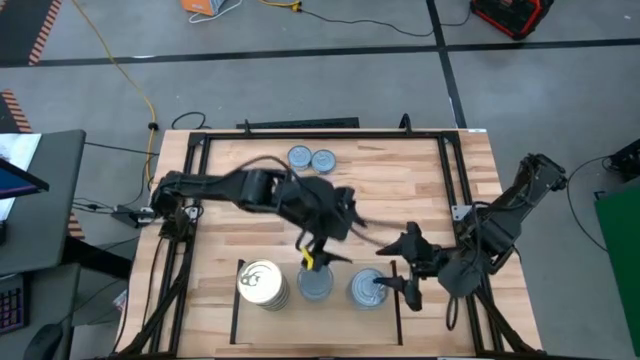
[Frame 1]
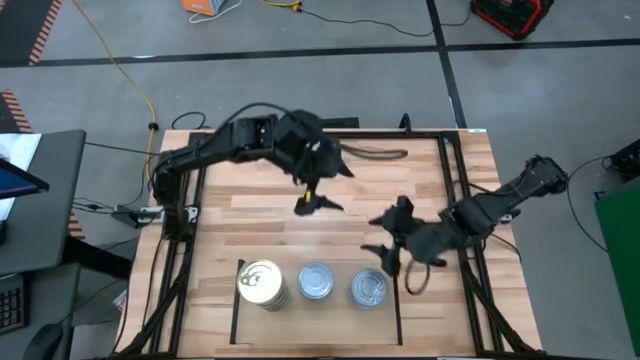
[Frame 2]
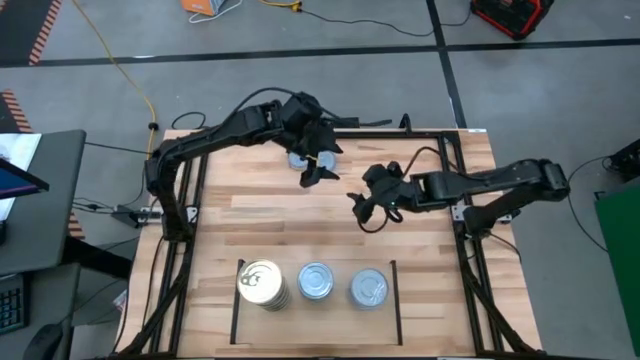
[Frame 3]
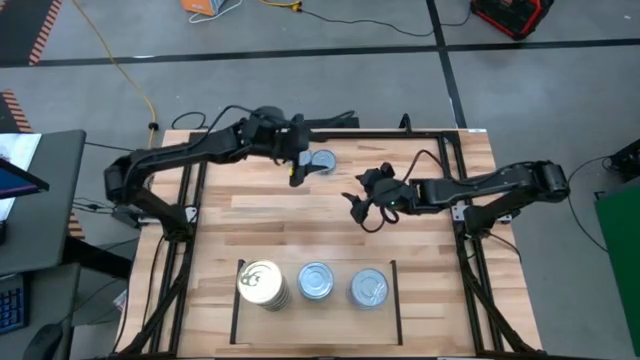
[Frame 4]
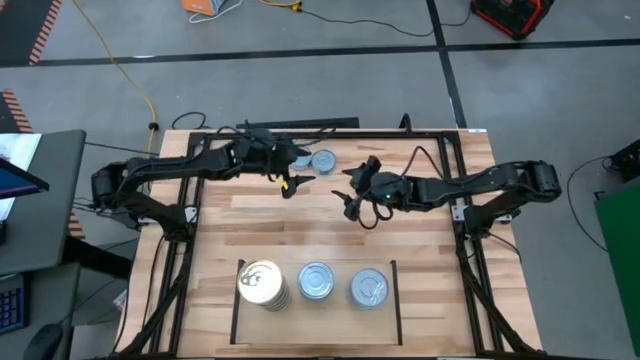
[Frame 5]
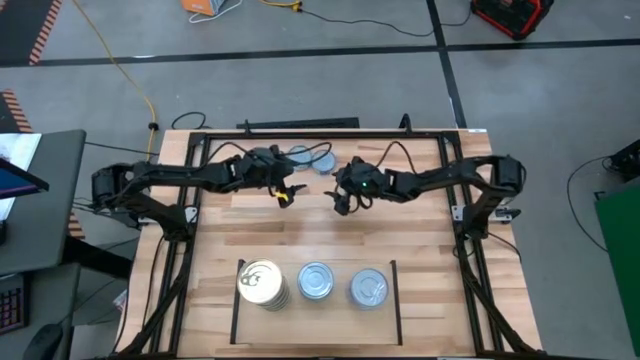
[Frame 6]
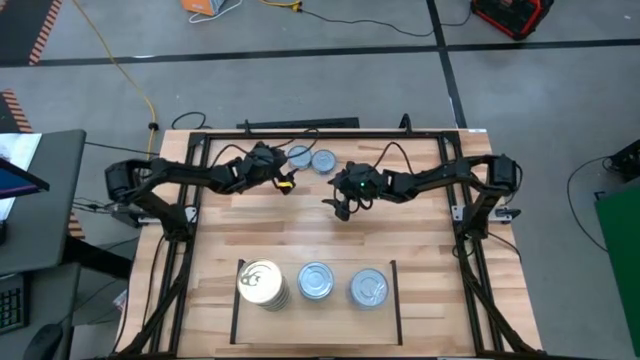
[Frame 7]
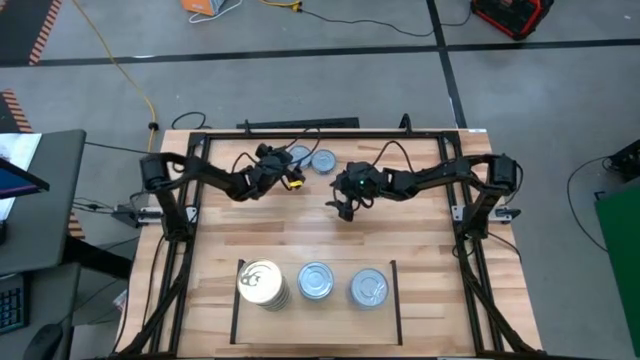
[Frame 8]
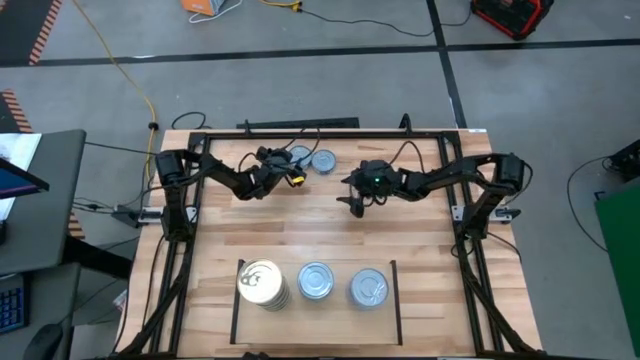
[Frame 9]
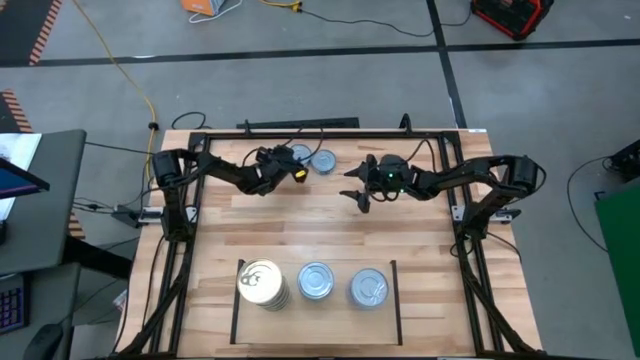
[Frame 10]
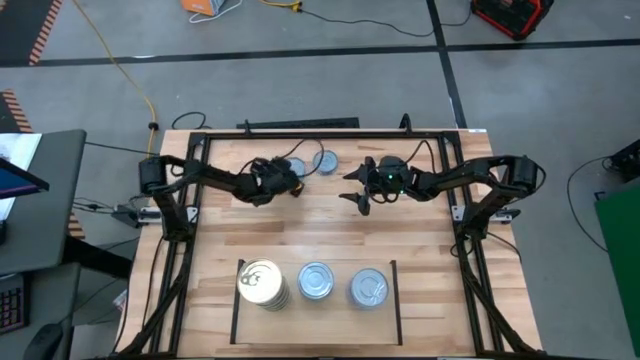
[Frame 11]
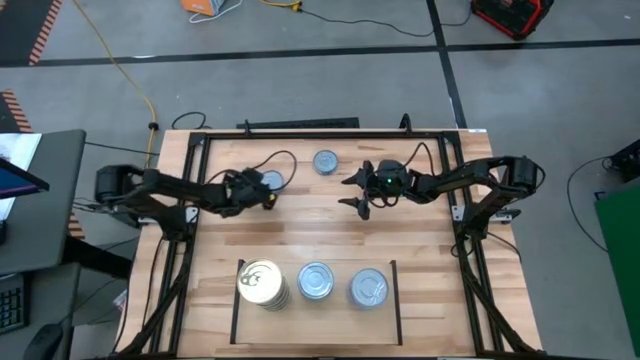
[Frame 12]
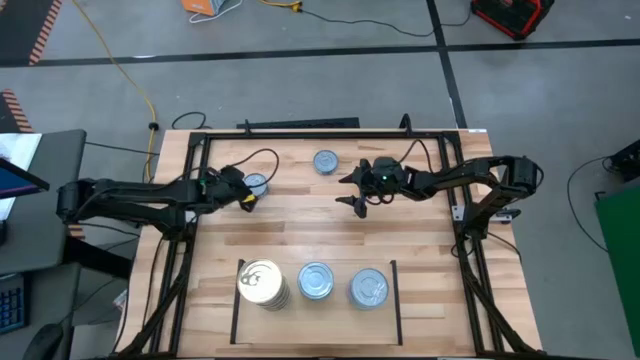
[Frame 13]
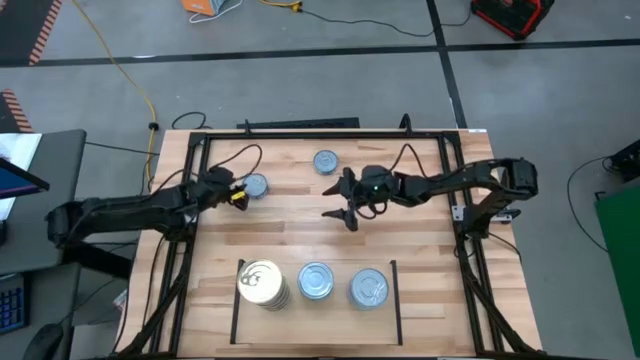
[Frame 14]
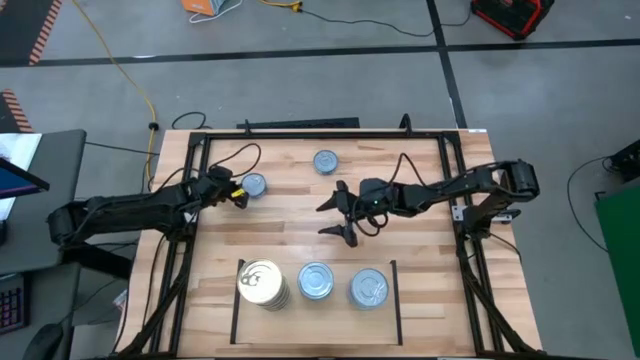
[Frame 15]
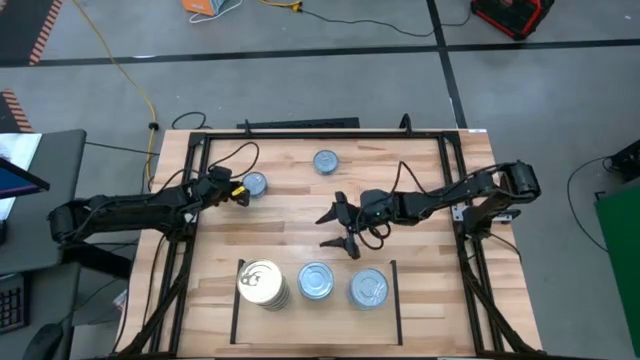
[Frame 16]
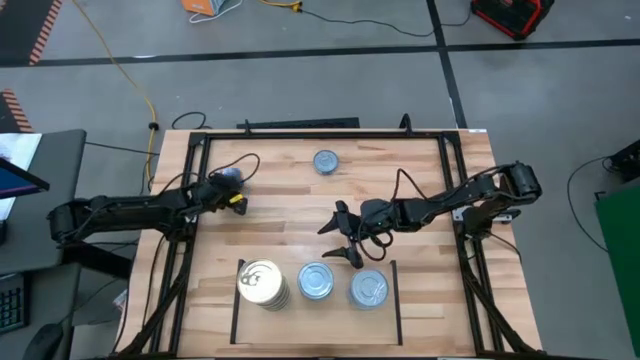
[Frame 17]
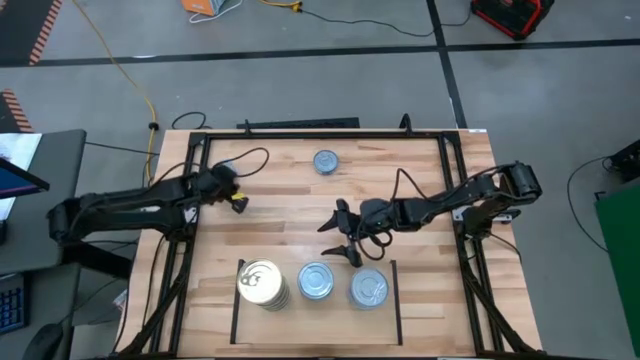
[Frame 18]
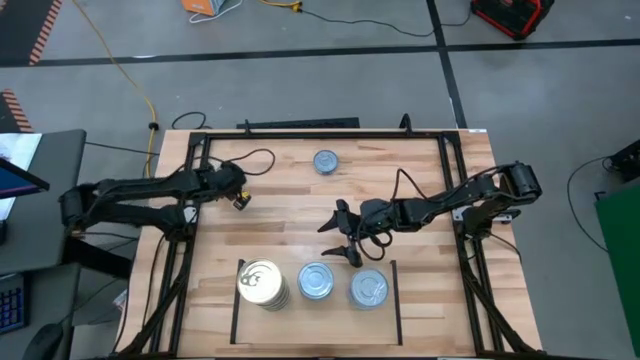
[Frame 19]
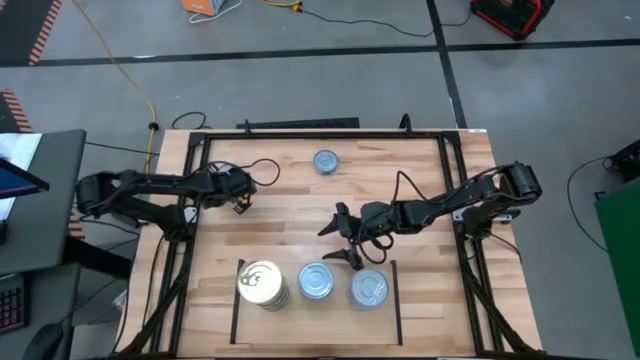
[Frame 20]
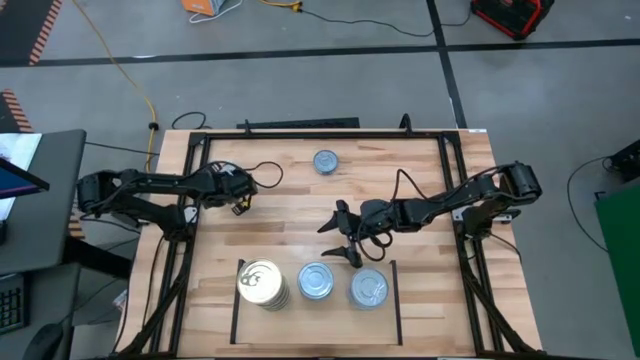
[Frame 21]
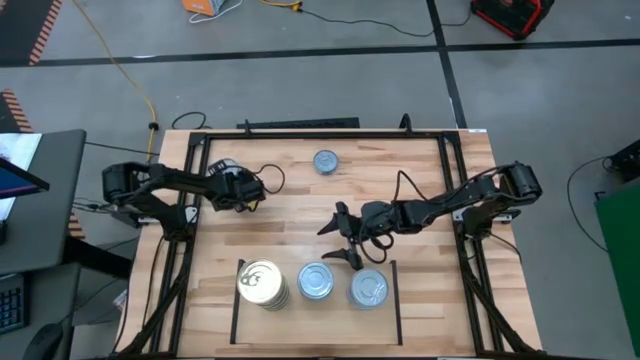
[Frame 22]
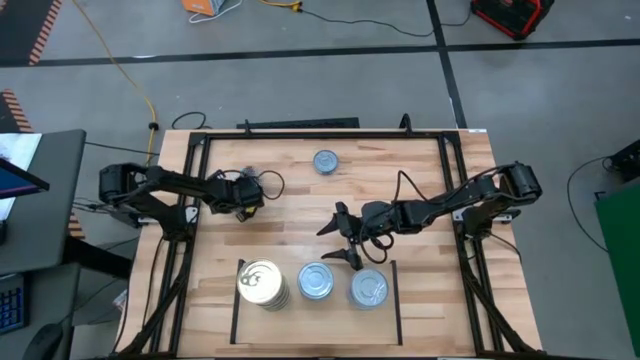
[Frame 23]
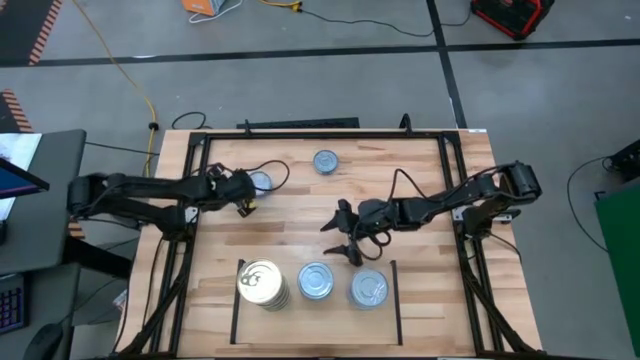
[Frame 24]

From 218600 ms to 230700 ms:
Task: Stack canned seafood by type on shelf
Put the left blue tuna can on the top of the left stacked tuna cans on the shelf

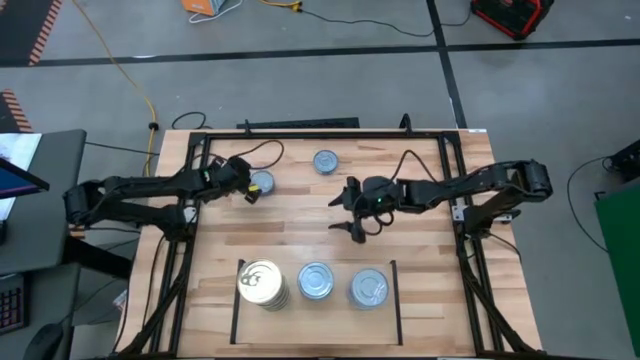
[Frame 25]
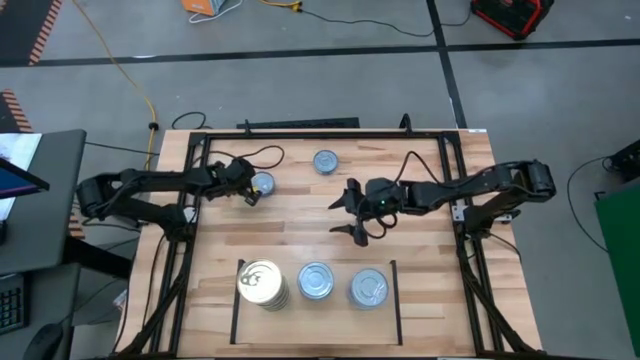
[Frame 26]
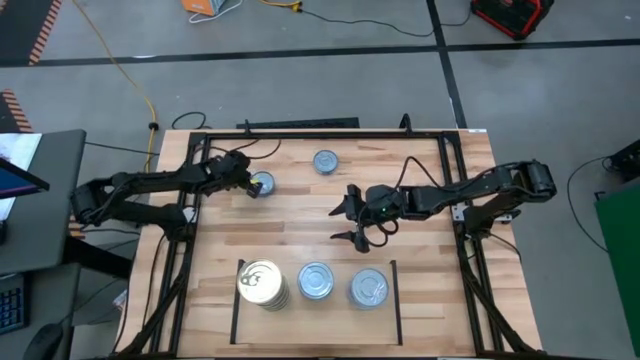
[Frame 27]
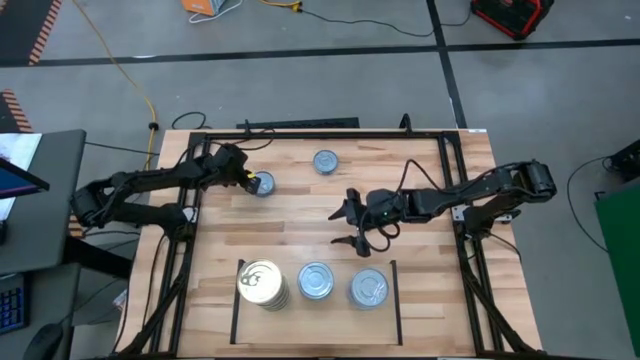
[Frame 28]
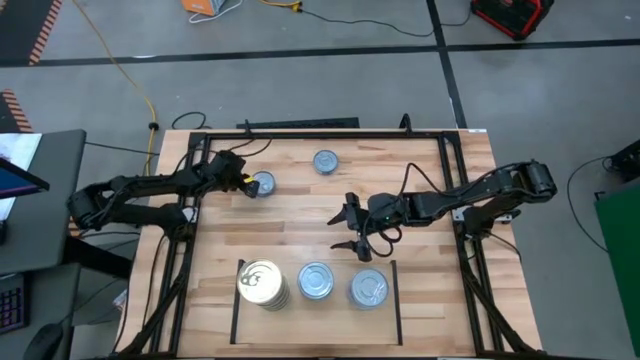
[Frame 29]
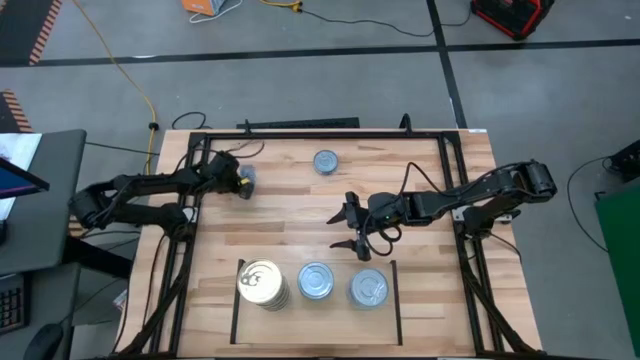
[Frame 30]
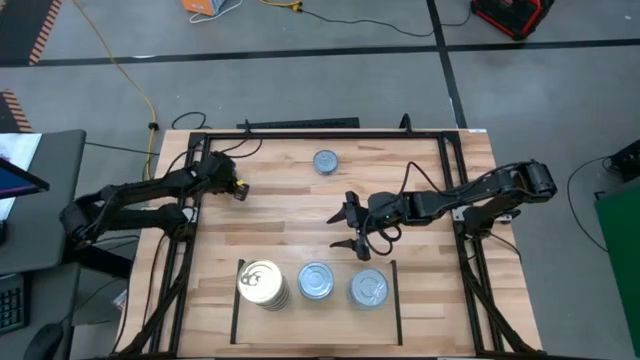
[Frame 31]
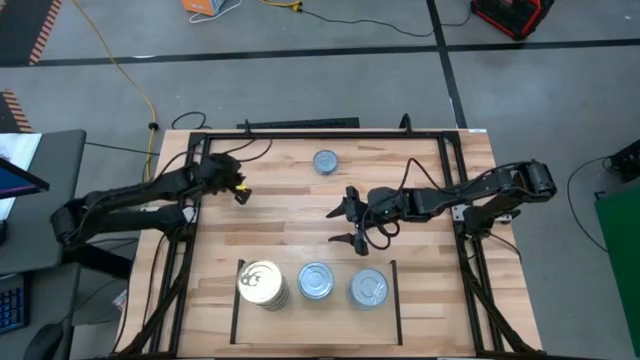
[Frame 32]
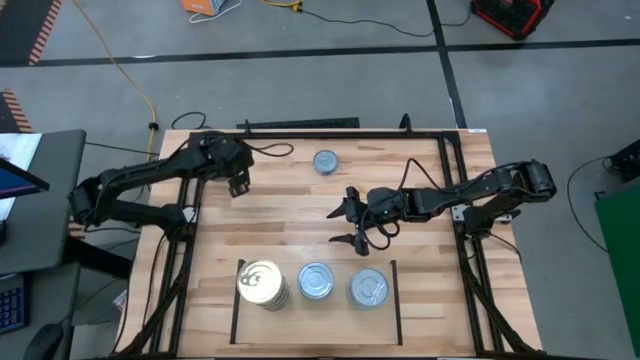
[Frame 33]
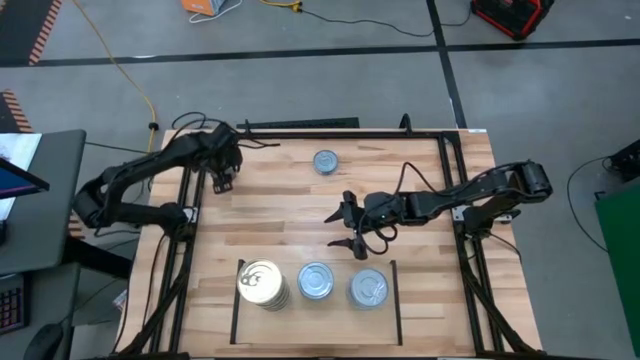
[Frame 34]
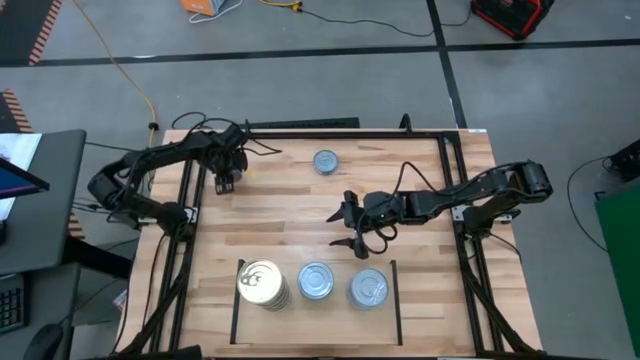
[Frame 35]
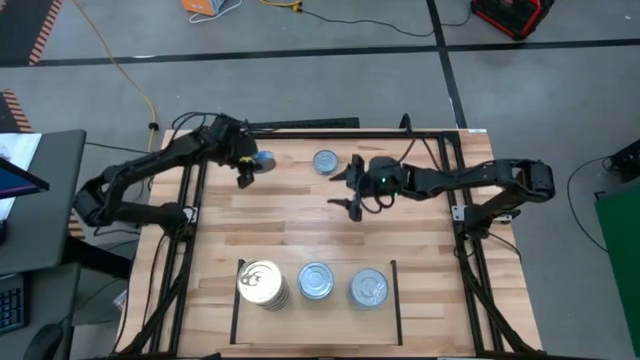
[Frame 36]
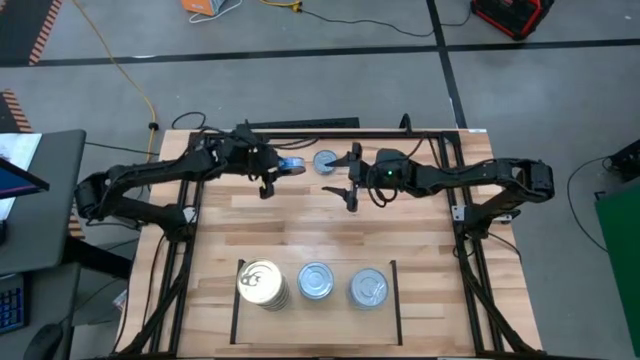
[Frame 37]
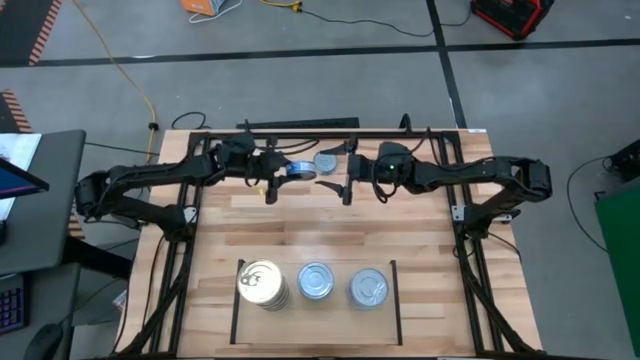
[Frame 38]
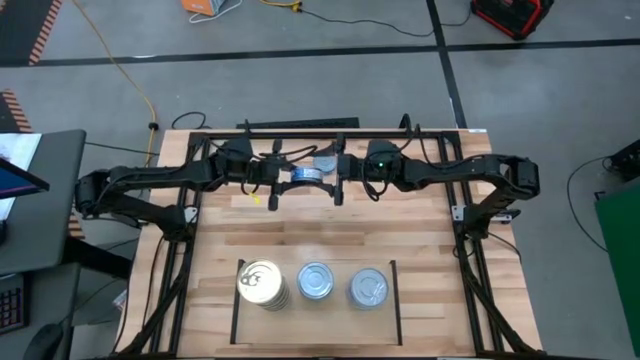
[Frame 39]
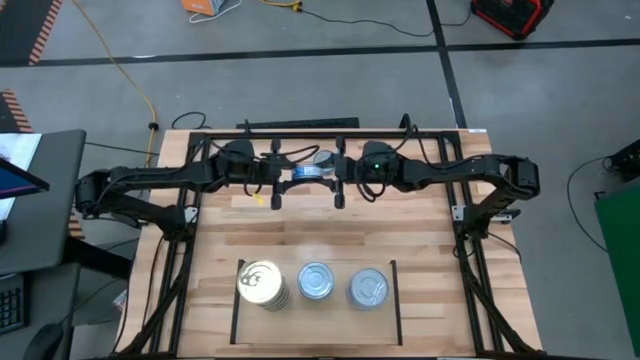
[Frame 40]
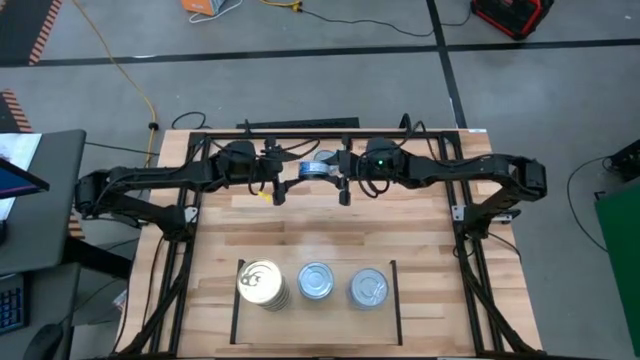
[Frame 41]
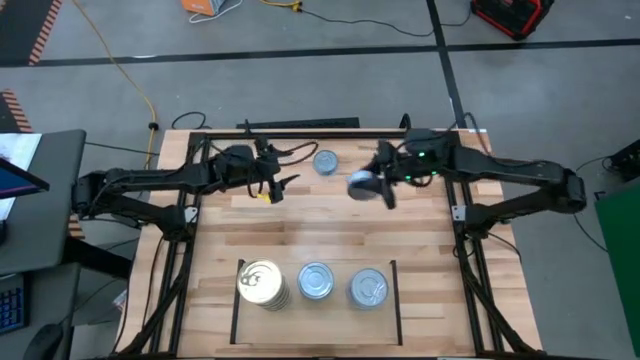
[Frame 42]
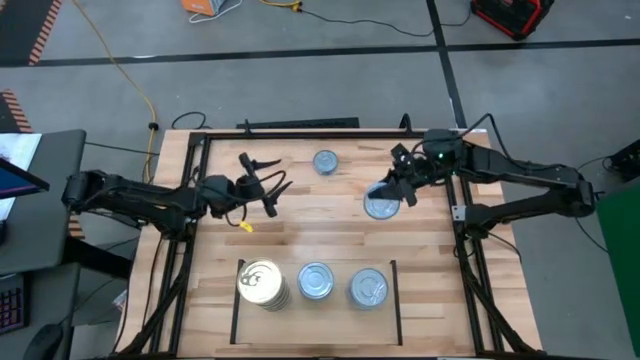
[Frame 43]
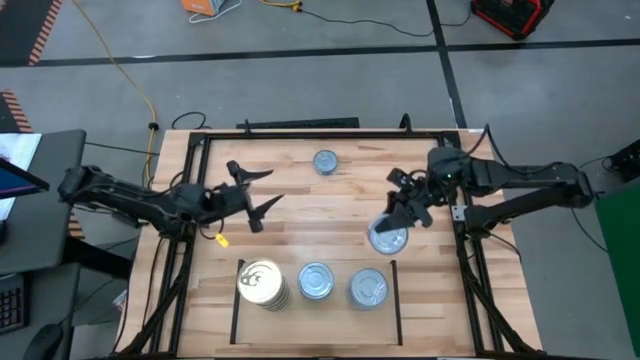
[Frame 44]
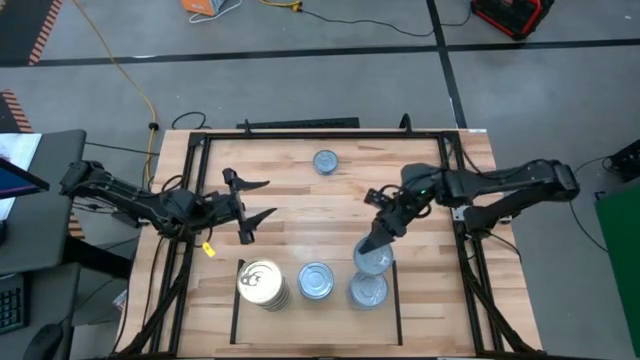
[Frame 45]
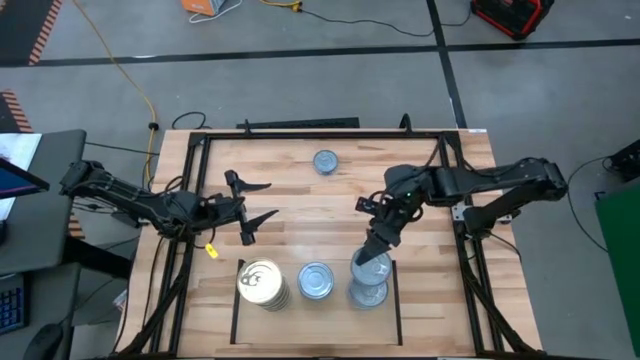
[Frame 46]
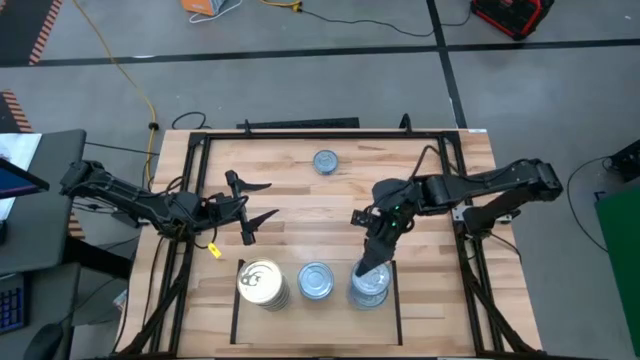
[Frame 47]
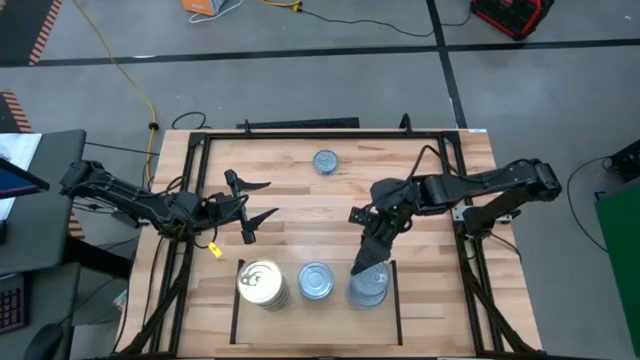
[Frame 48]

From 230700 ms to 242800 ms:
Put the left blue tuna can on the top of the left stacked tuna cans on the shelf
